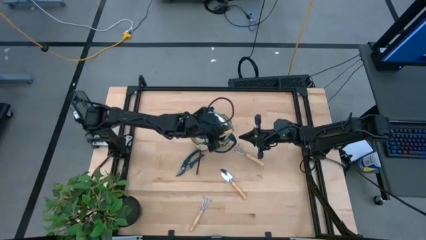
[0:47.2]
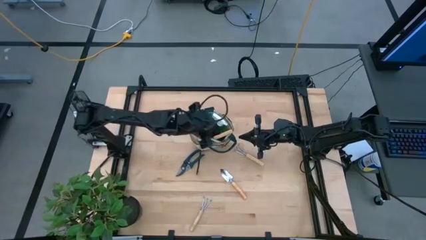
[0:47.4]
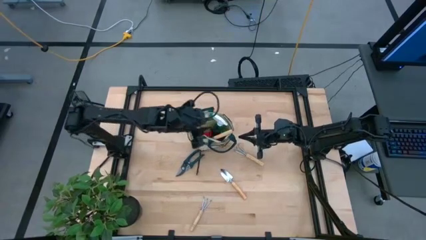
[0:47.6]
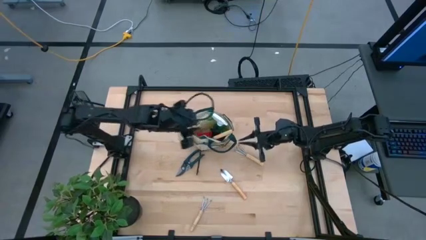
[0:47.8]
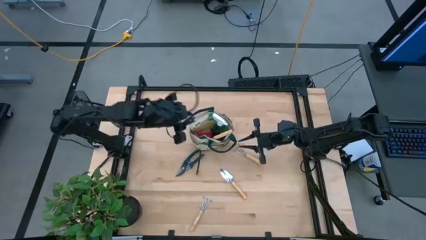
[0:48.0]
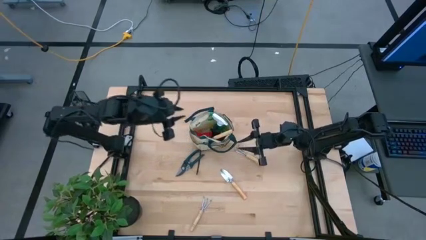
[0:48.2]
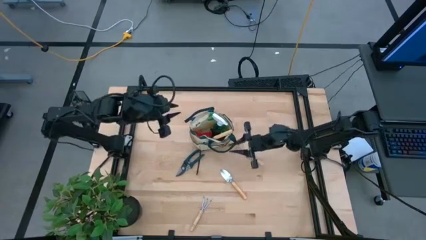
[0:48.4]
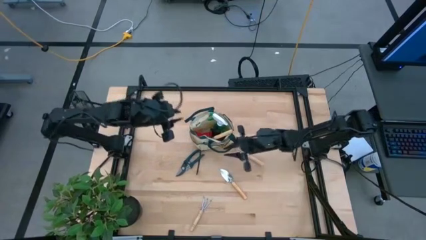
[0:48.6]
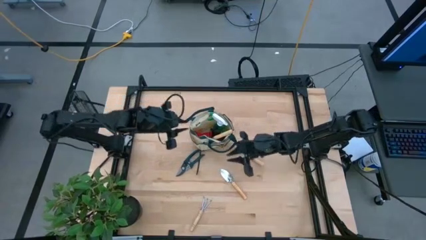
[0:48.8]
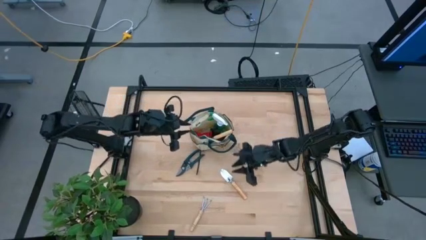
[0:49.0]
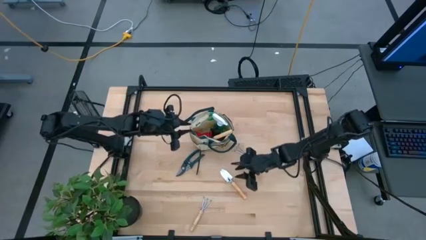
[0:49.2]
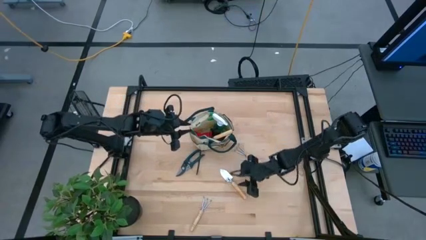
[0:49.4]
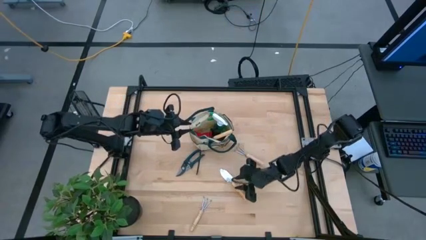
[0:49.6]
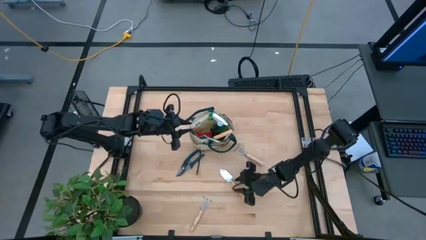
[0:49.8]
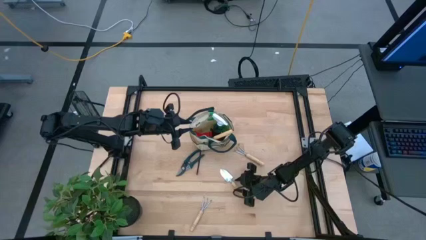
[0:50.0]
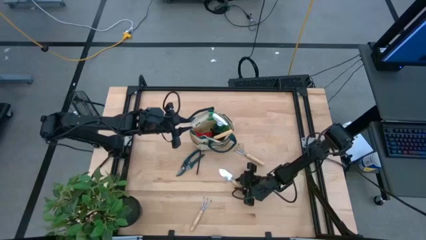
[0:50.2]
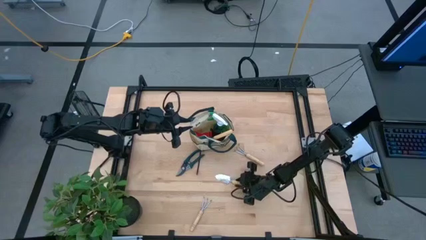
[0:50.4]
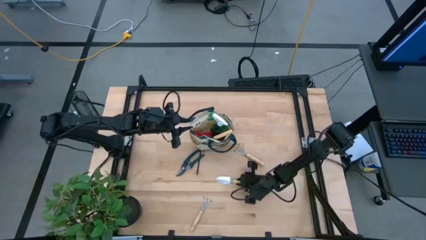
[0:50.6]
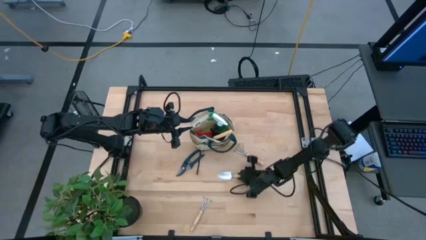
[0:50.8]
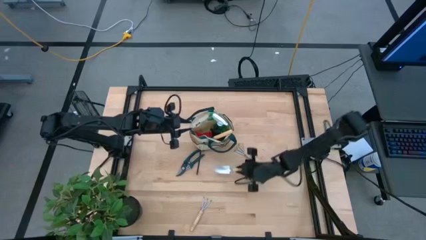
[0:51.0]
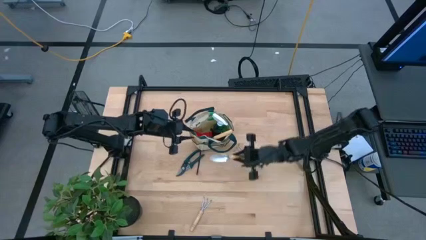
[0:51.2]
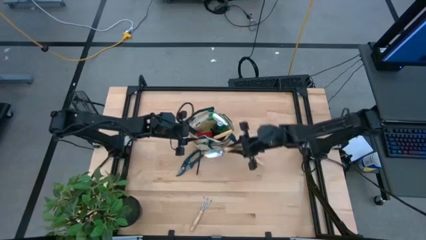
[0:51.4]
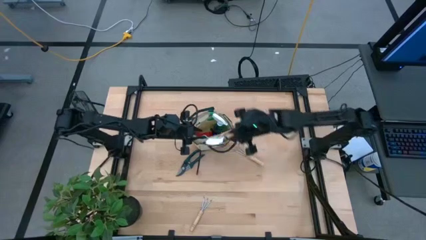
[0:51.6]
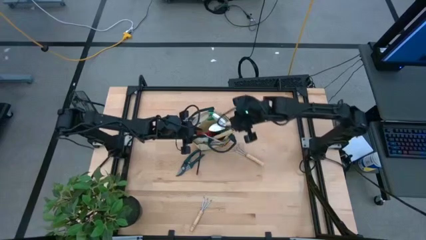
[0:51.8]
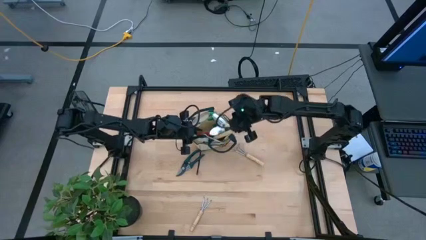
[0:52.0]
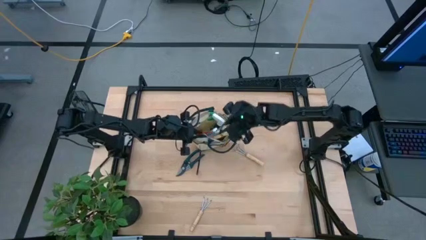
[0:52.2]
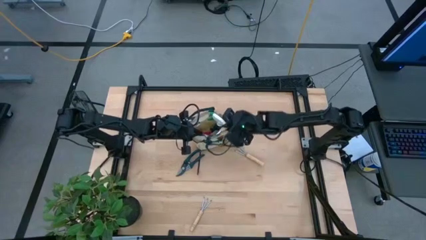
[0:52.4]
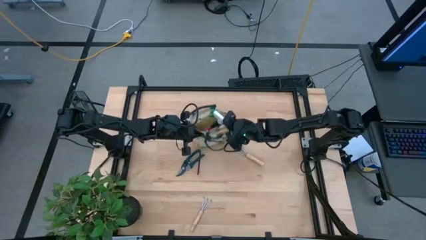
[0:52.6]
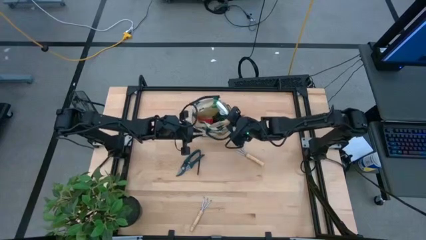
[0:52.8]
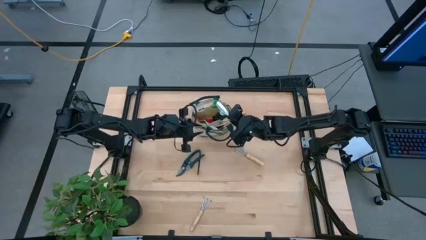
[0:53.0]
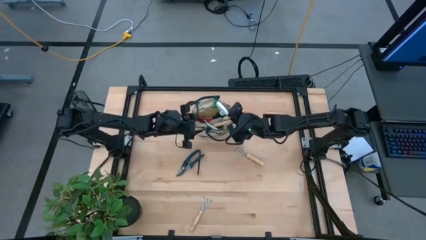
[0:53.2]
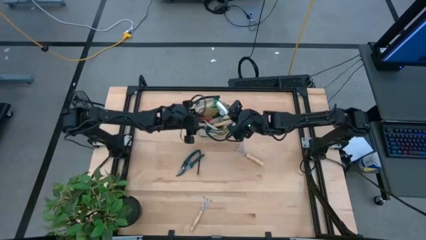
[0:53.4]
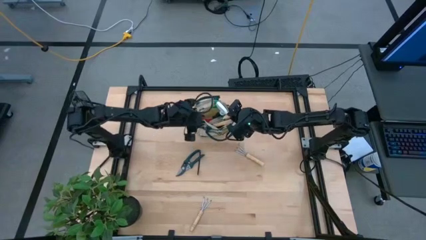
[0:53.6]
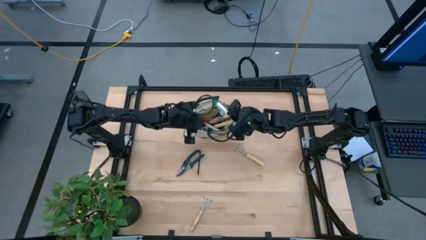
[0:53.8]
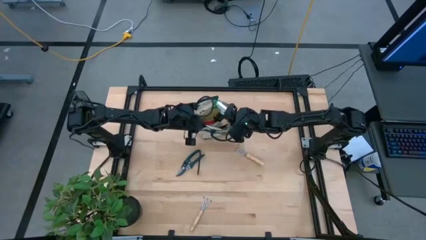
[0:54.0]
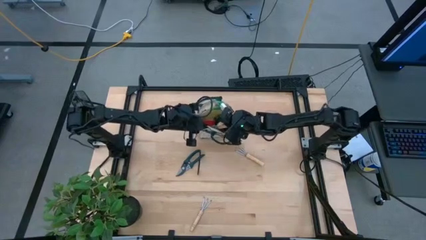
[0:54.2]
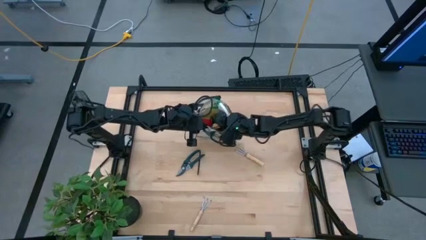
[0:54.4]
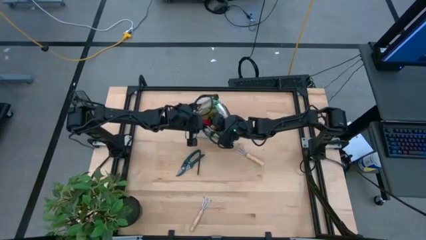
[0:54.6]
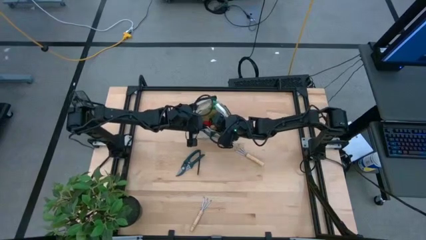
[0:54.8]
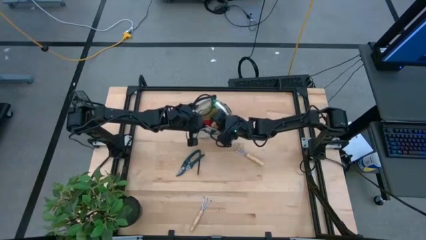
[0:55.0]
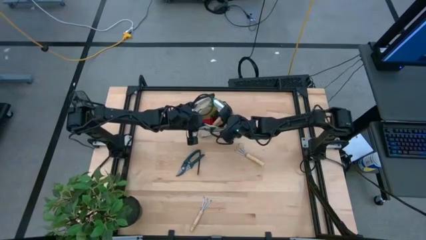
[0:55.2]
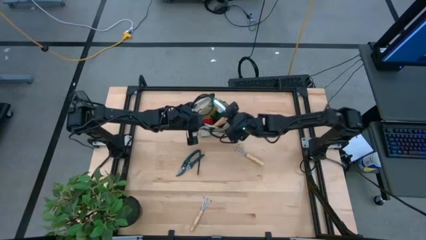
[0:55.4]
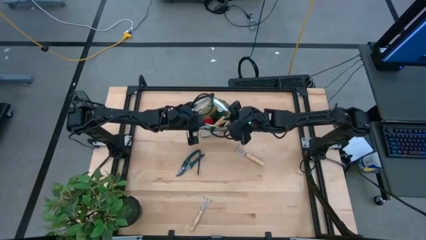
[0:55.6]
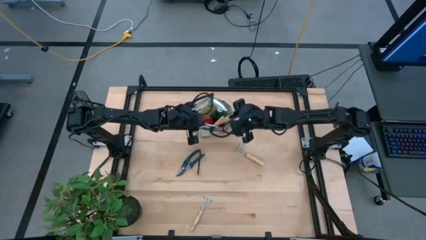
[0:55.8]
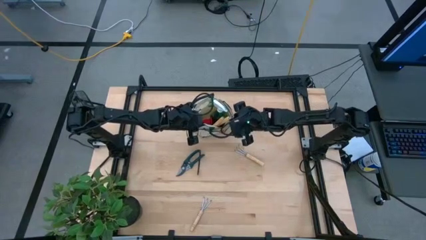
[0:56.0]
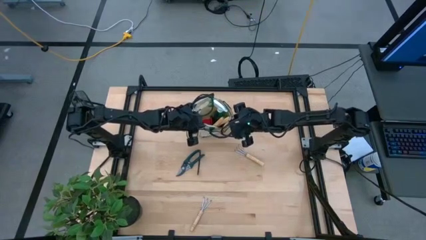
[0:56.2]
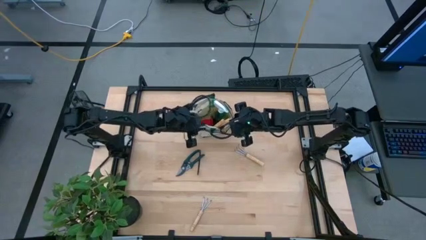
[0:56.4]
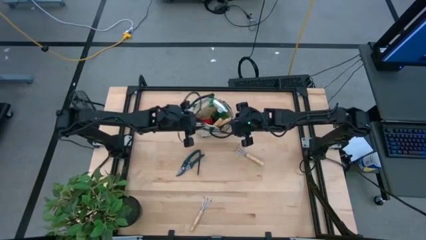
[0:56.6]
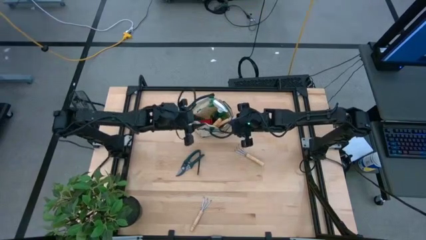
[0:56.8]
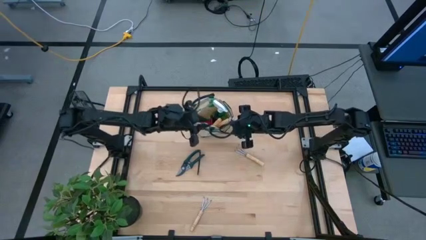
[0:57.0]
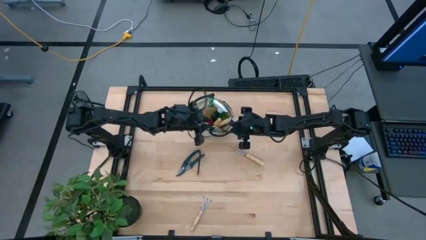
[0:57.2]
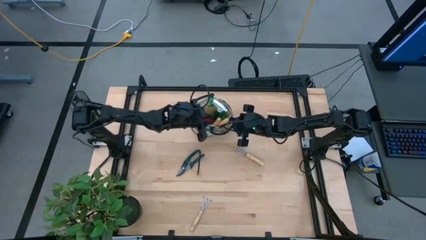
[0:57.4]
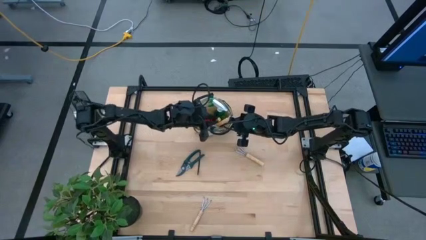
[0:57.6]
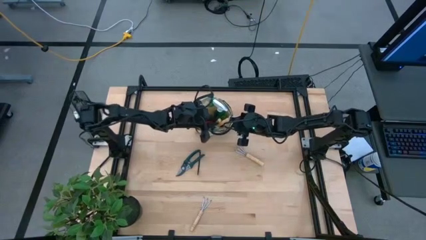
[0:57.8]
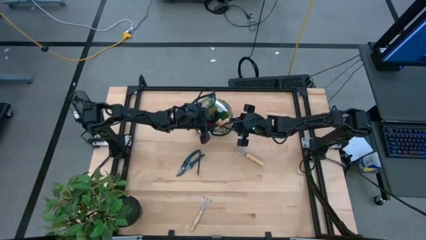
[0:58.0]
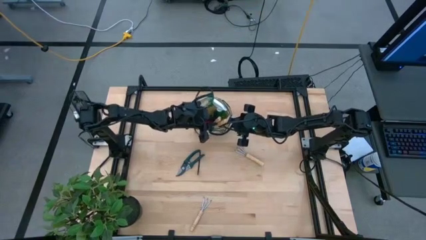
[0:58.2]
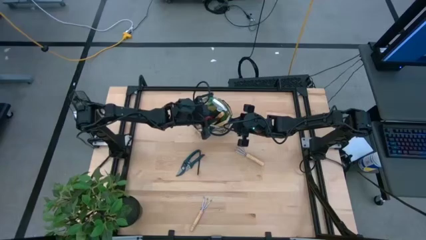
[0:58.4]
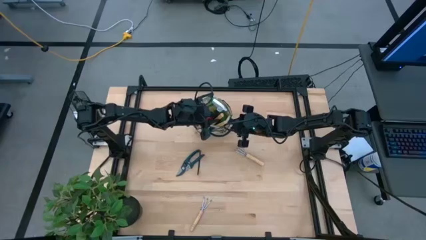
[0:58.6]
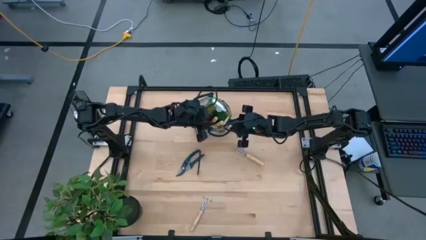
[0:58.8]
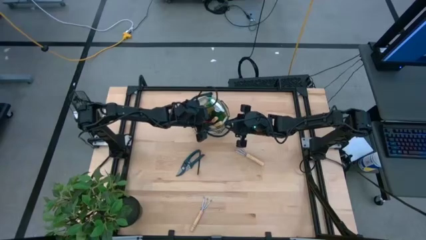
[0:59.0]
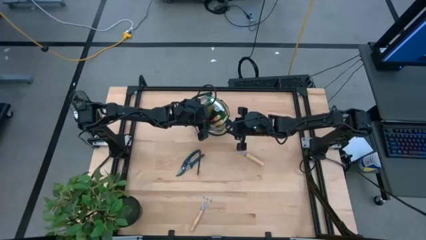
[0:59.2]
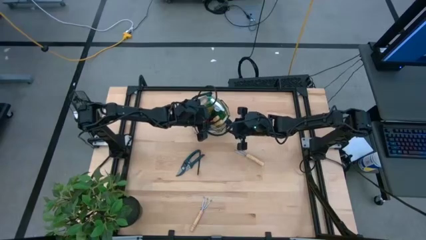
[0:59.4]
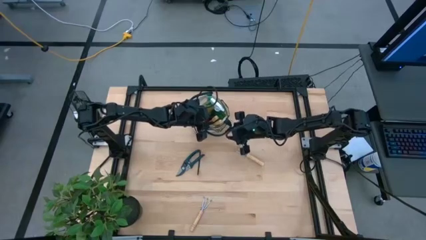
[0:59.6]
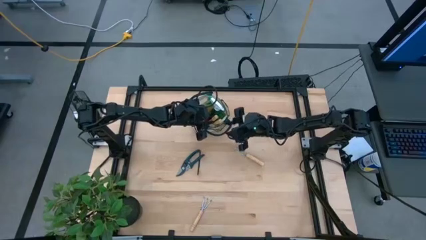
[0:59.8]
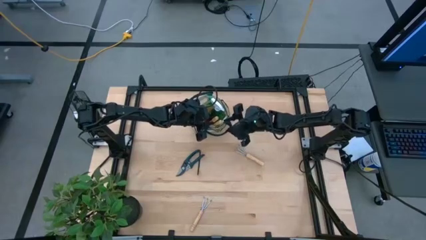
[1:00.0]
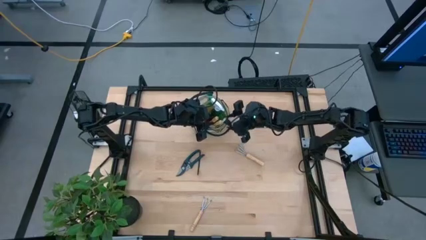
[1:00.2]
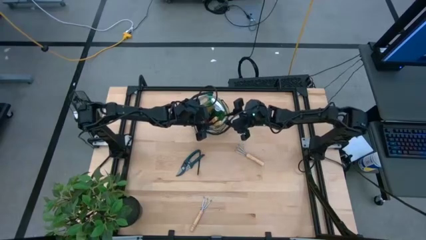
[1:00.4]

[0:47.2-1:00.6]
Task: Pick & Place Garden tools in Gardening bag
Put the trowel into the gardening bag
